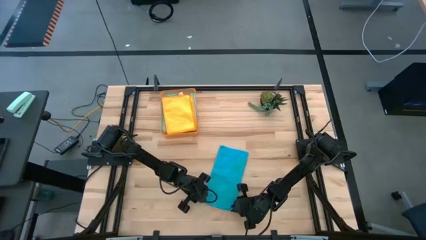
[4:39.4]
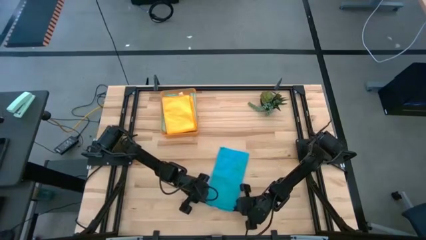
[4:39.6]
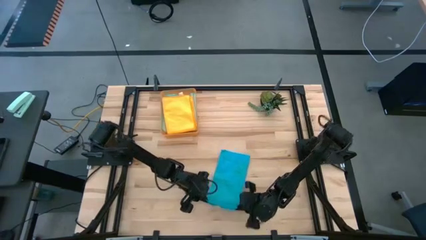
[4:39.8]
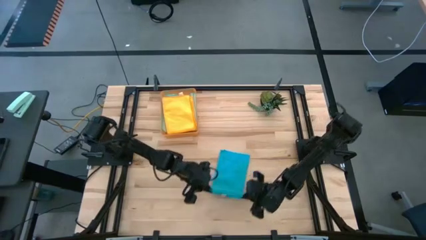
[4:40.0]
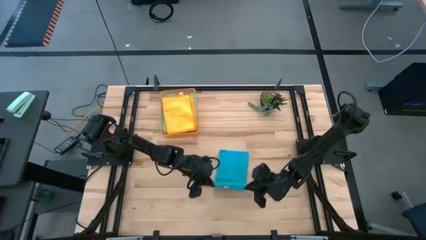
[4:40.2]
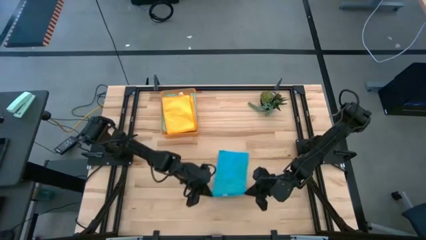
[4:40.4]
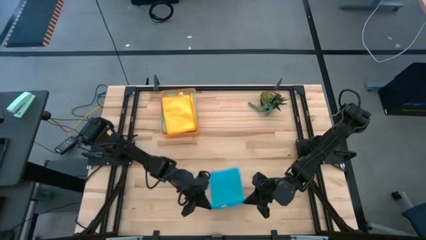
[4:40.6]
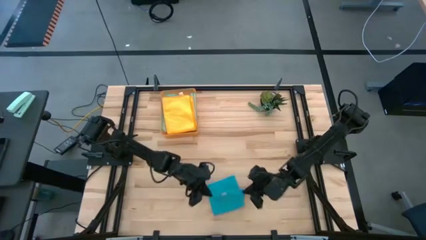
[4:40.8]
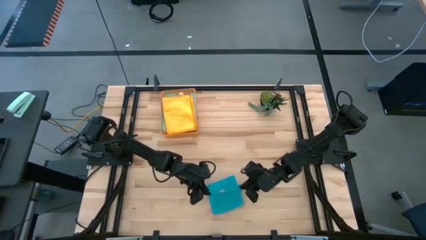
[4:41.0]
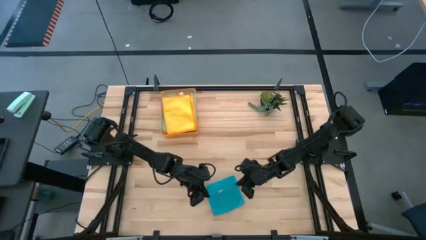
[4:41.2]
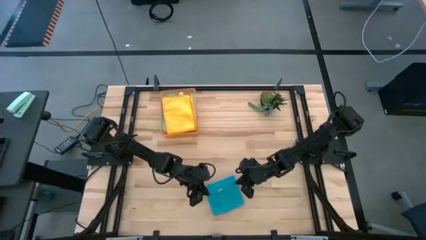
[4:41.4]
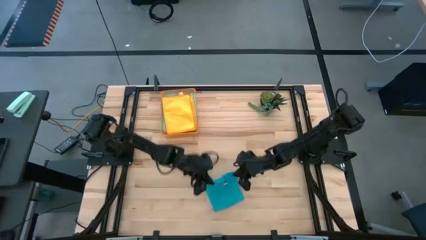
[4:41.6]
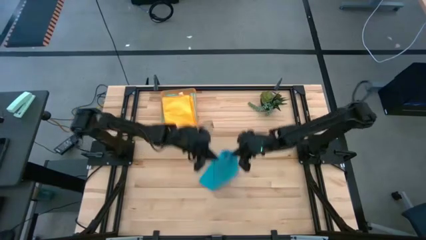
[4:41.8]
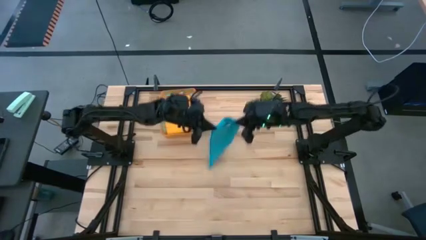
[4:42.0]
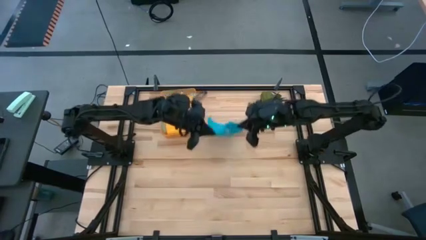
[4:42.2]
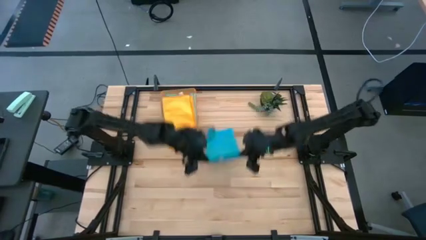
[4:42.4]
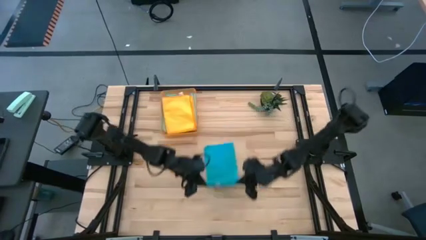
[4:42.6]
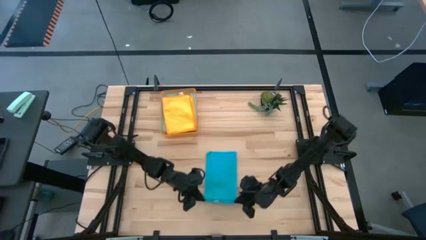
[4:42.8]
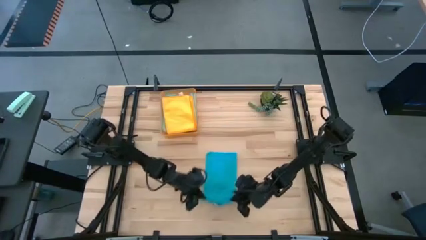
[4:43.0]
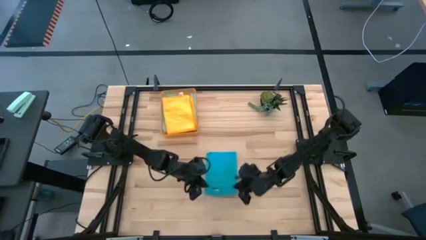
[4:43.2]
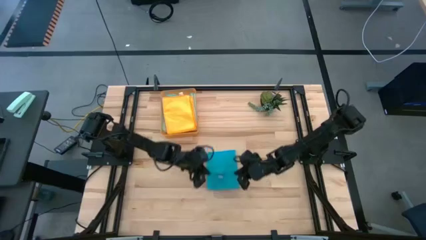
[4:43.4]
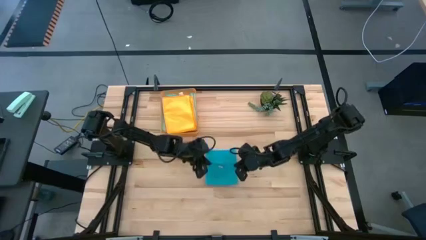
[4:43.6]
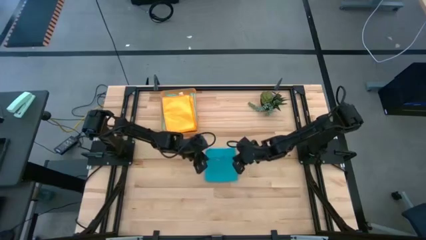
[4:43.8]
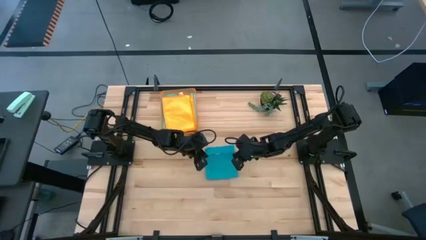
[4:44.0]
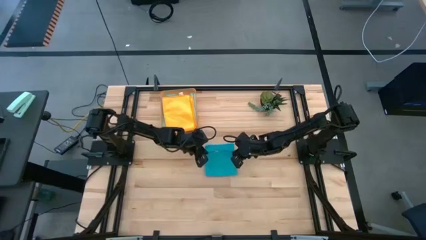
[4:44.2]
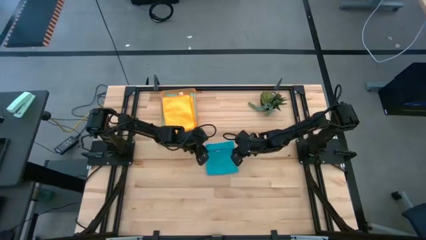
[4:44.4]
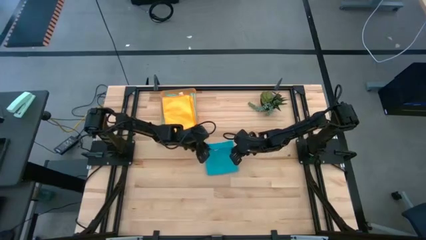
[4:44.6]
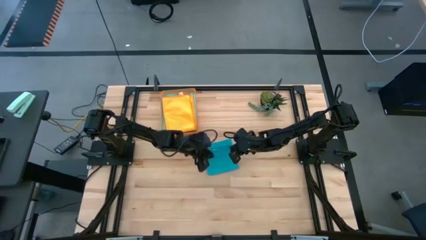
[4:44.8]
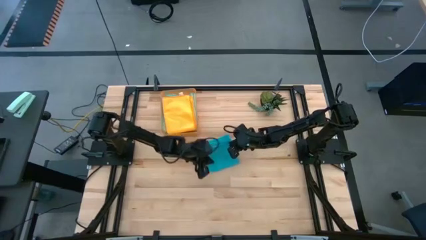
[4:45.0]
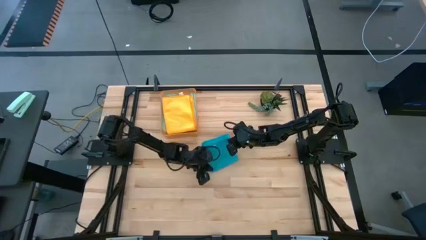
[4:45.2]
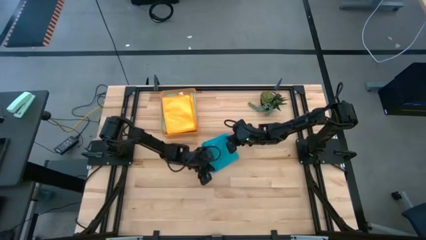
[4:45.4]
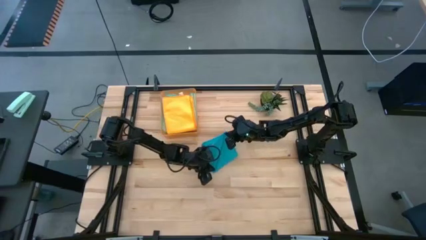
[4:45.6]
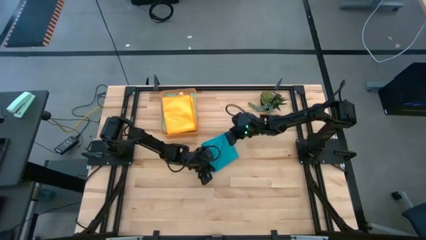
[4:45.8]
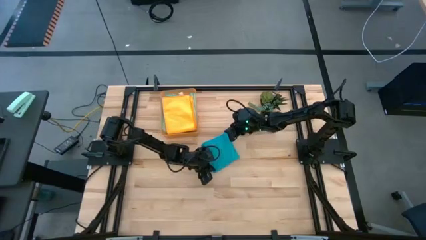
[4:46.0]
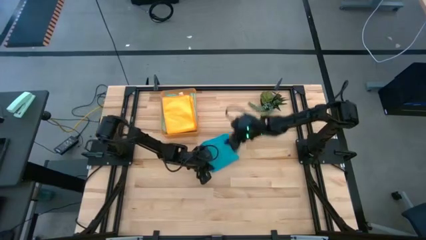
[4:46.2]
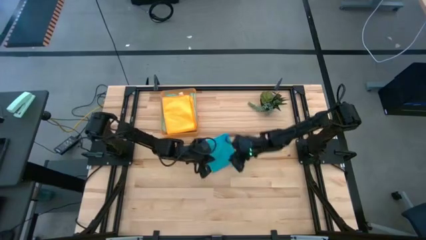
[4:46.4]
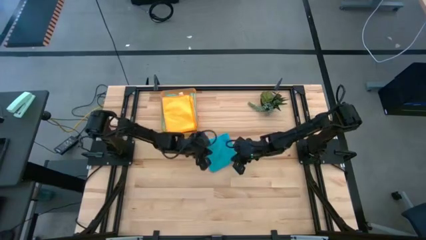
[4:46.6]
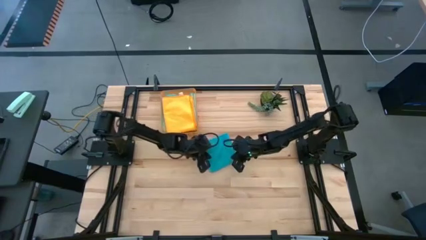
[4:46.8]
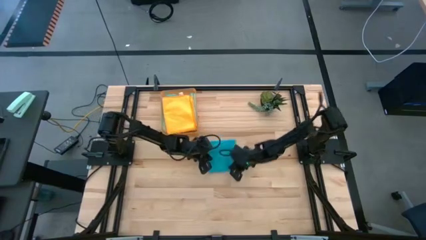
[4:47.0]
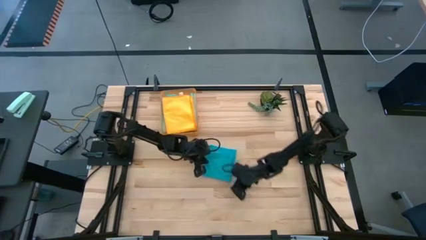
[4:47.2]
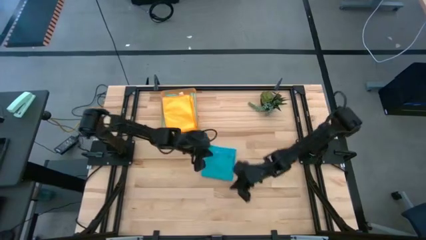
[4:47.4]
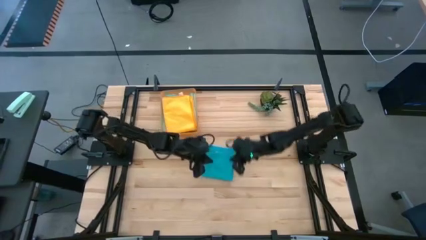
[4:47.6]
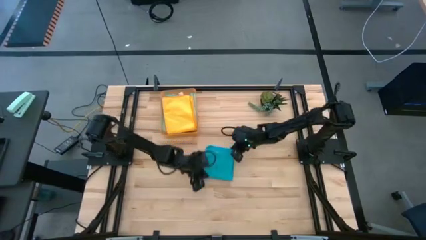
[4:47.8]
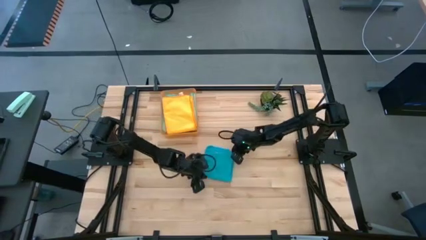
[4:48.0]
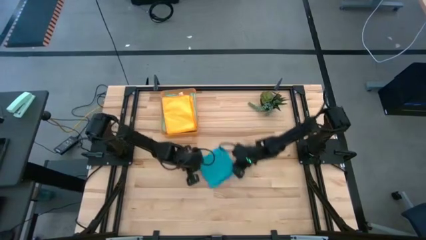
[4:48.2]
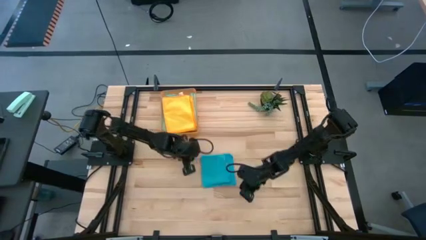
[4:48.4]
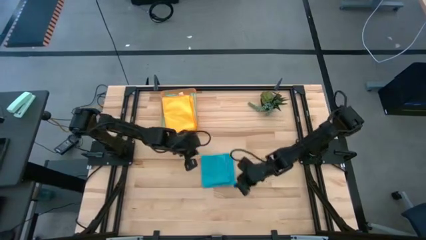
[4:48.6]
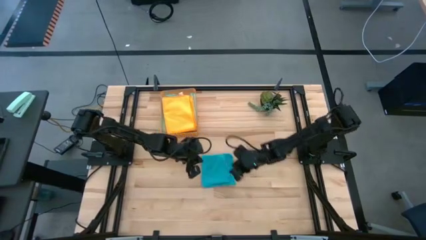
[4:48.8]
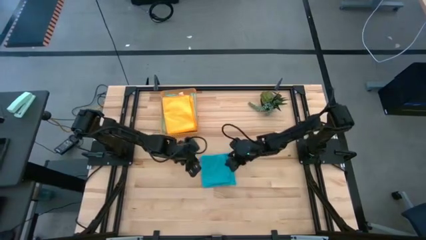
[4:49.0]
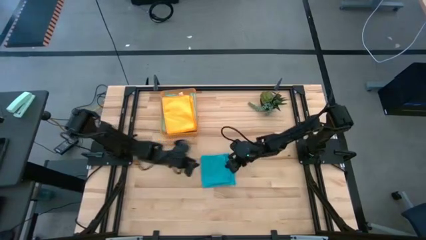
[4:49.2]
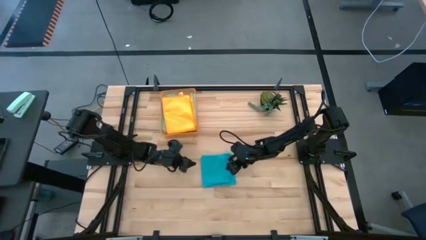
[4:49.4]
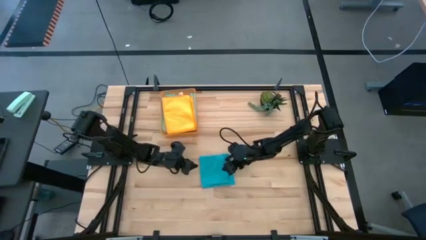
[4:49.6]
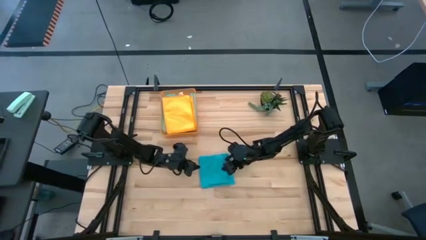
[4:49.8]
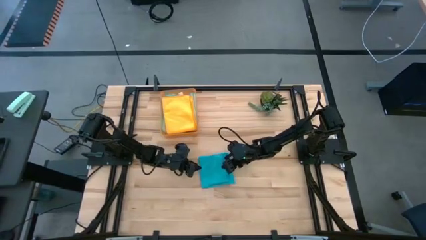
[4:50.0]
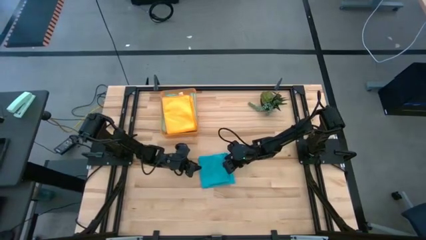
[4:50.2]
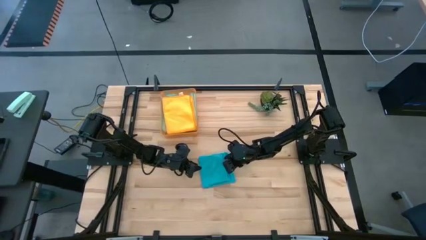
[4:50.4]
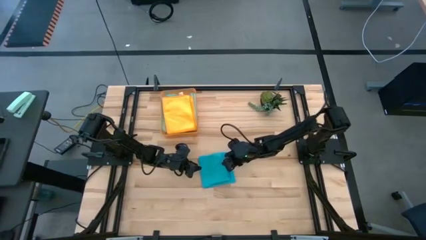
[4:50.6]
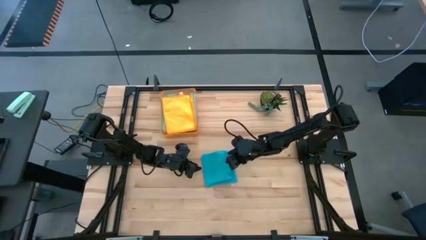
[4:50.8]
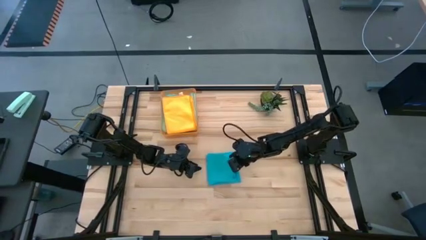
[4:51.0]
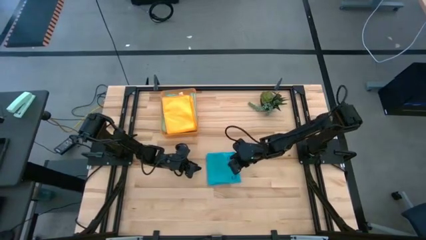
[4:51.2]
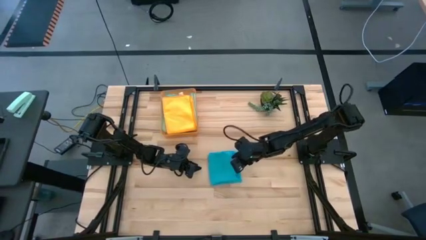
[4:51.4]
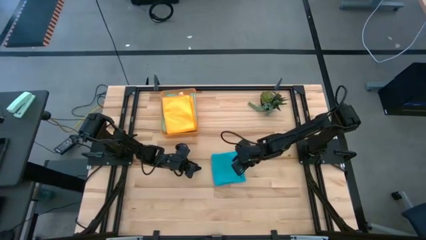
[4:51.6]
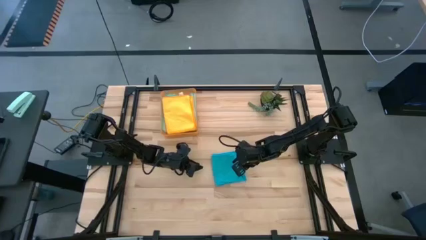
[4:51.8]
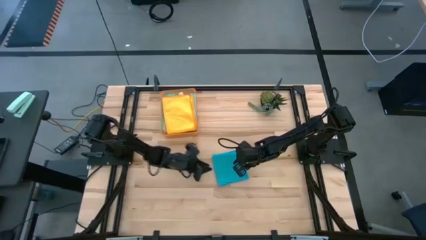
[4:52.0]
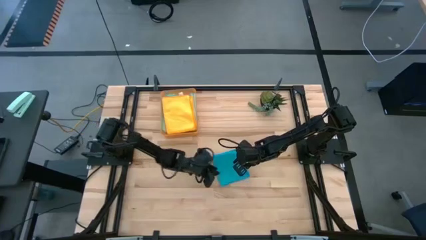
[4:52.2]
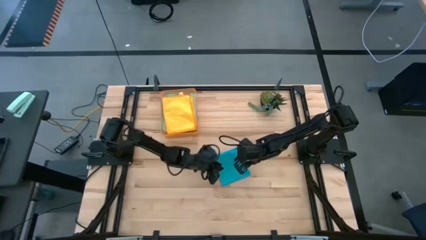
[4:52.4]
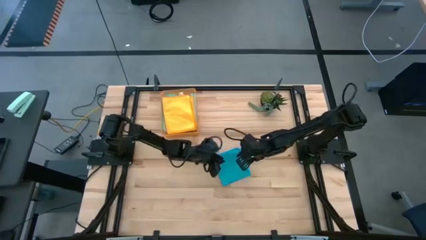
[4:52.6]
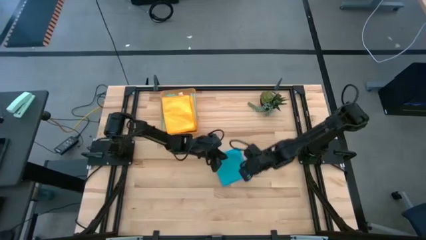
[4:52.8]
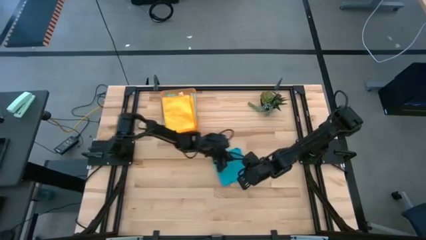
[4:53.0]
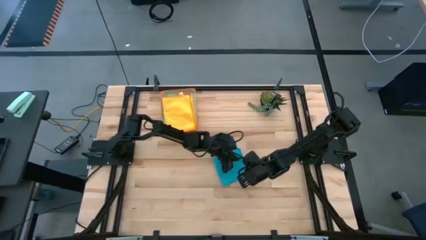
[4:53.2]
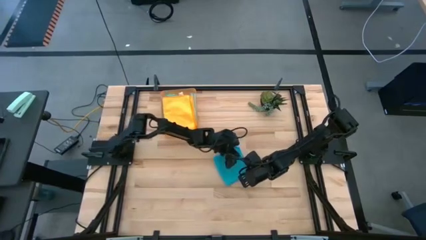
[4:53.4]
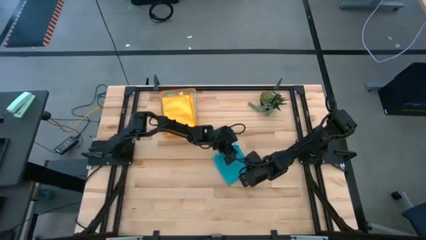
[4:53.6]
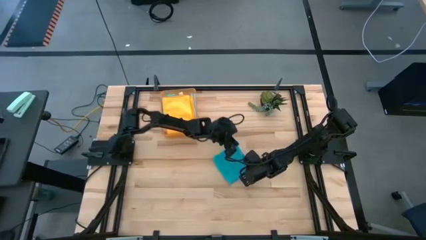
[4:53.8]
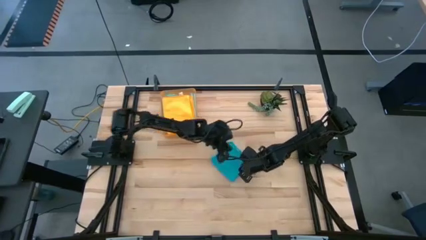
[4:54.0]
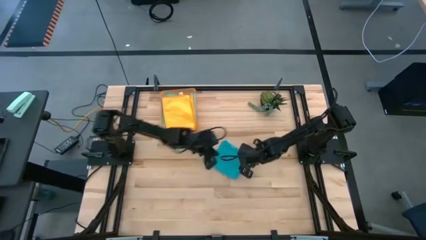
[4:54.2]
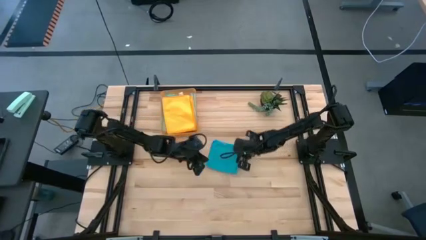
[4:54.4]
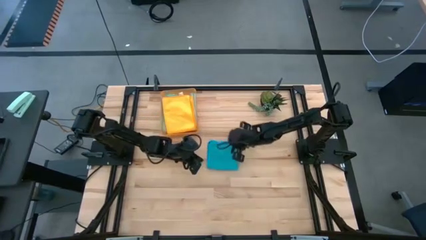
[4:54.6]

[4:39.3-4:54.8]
Task: Fold microfiber towels
Fold the blue microfiber cloth
